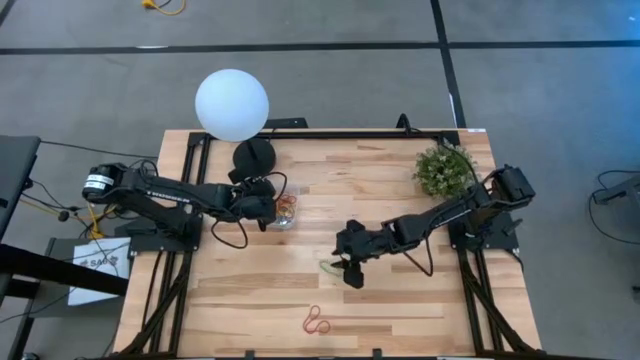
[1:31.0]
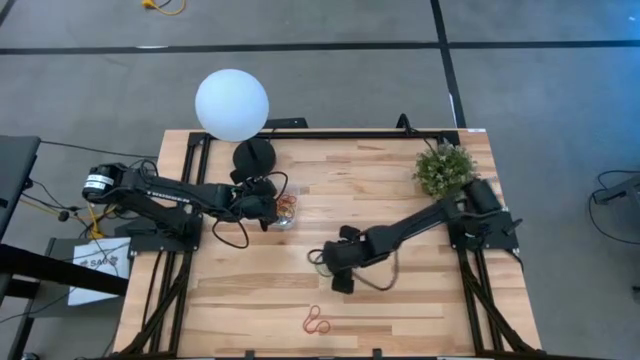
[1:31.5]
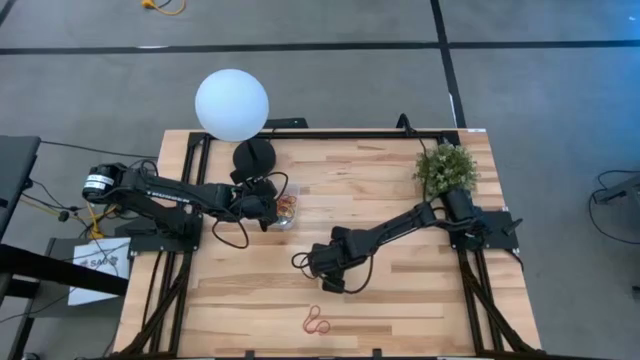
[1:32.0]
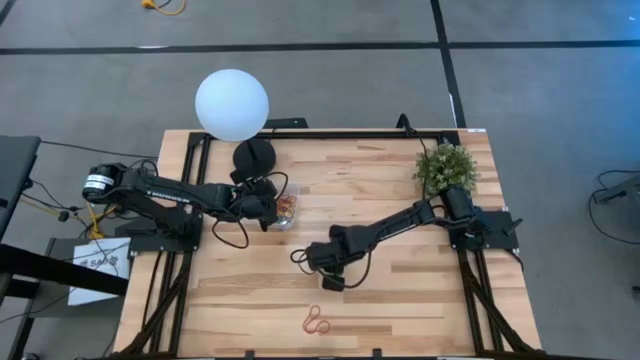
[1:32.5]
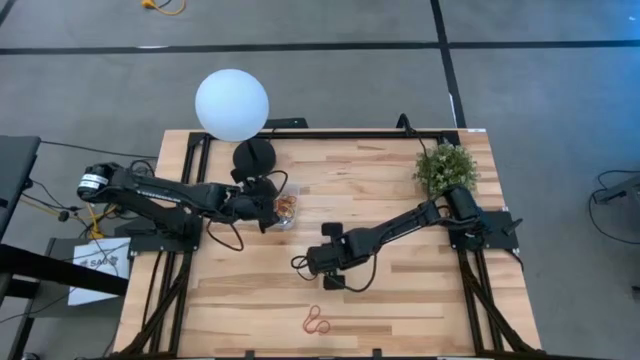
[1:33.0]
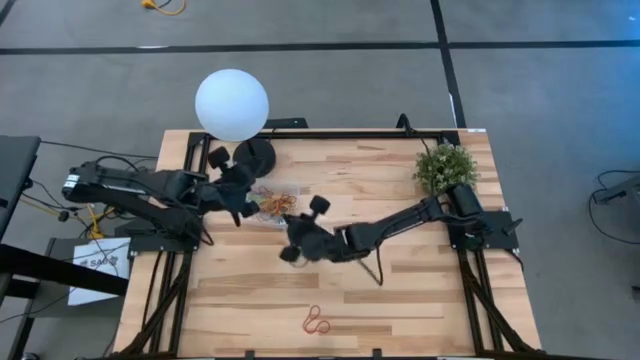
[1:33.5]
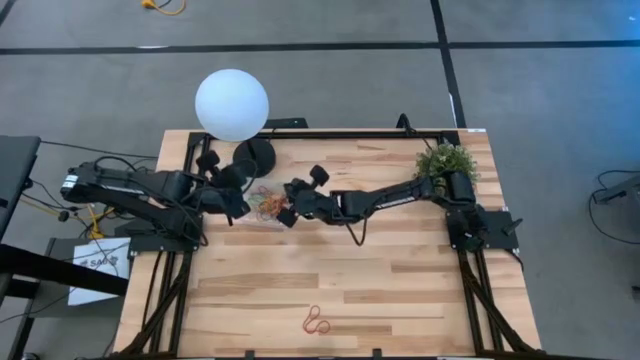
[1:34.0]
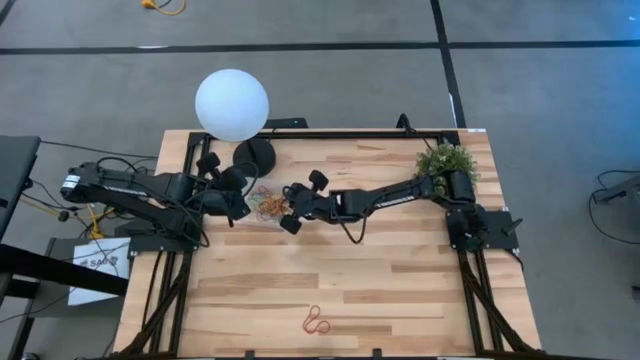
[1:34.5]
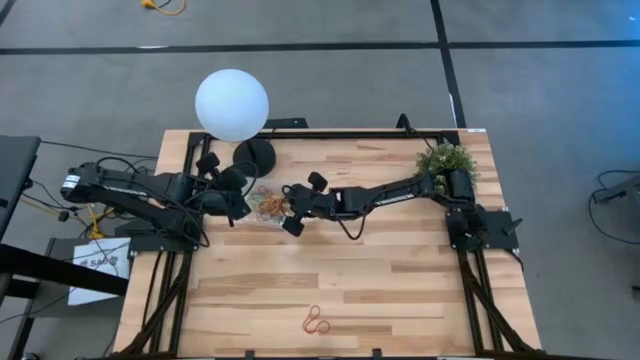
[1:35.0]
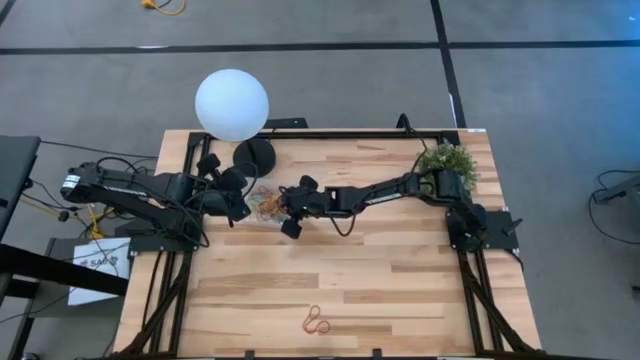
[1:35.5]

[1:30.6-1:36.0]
Task: Pick and place rubber bands into bin
Put the green rubber band into the transparent container

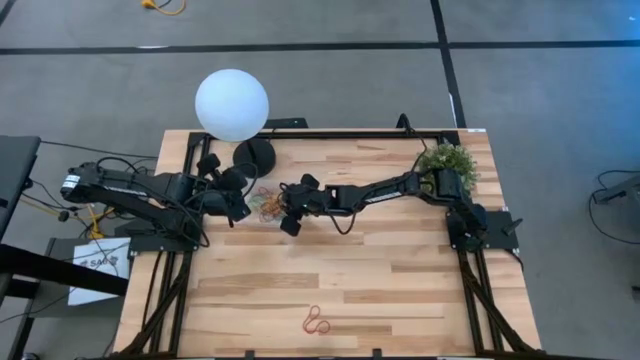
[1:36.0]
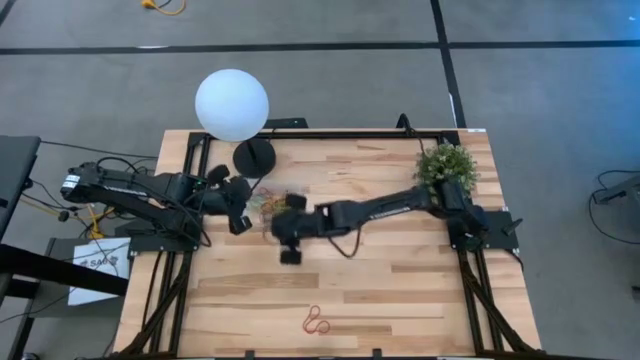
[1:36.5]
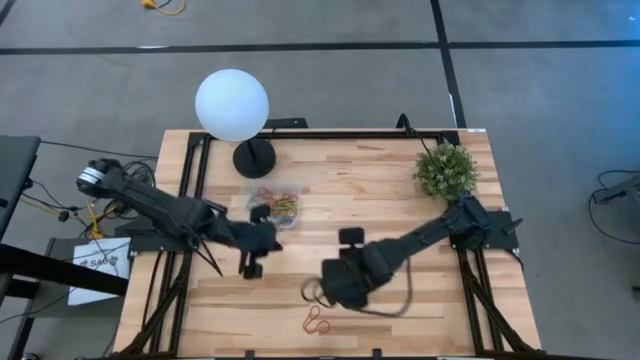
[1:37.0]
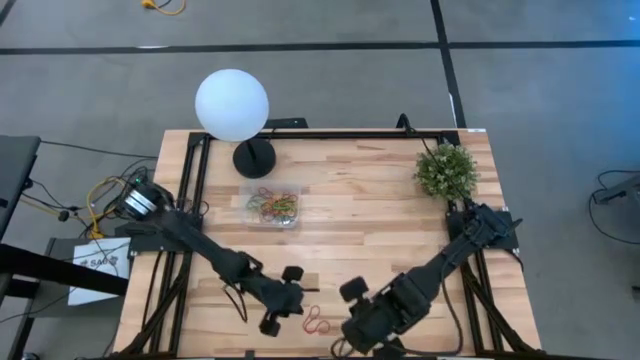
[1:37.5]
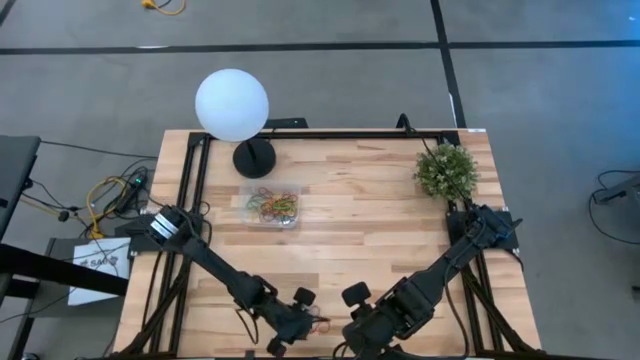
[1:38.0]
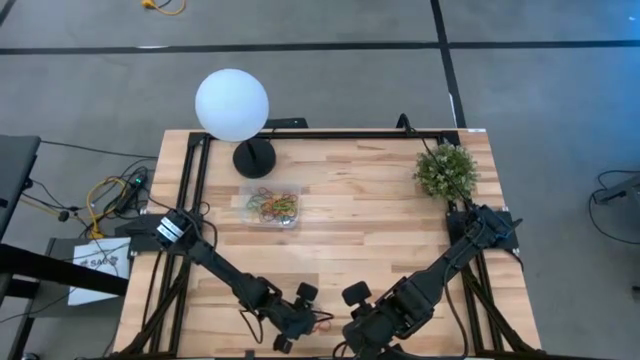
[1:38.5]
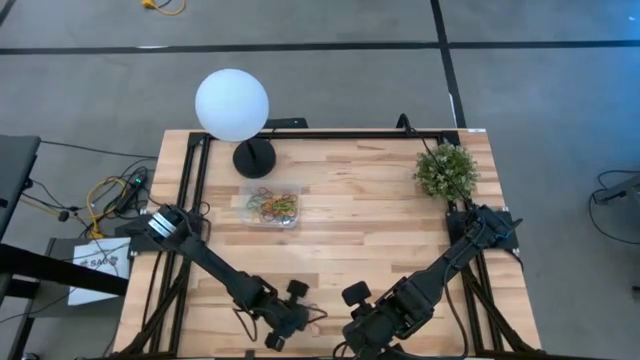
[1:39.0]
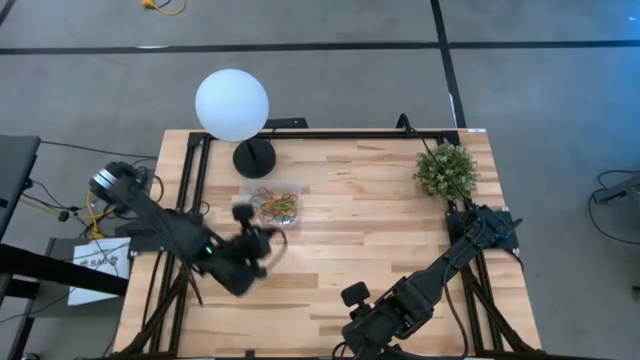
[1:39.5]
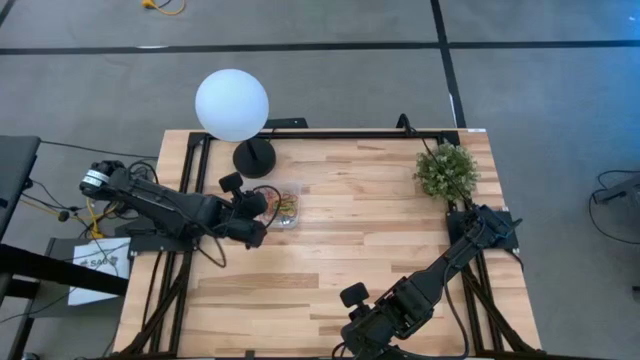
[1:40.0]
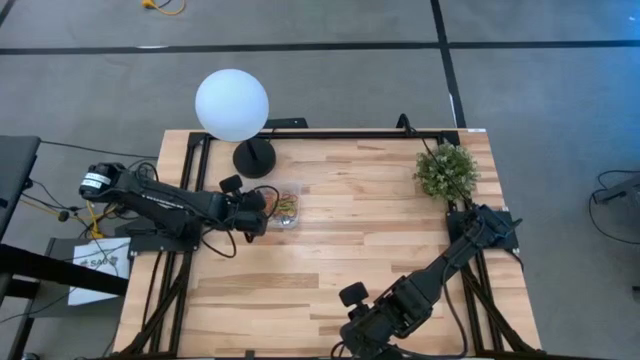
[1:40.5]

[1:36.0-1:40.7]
Put the red rubber band into the transparent container

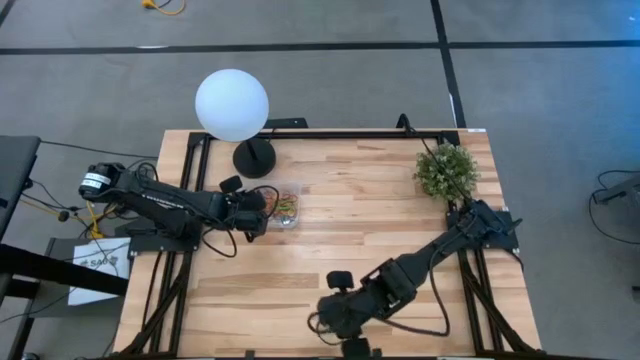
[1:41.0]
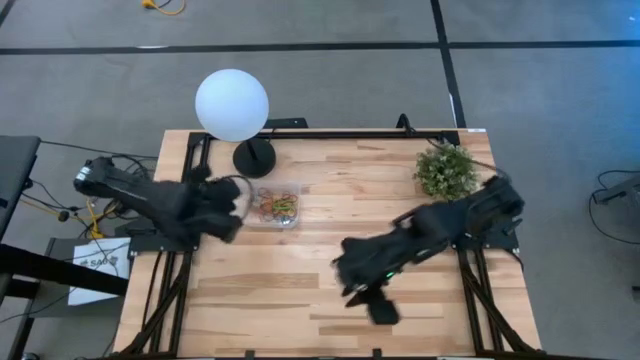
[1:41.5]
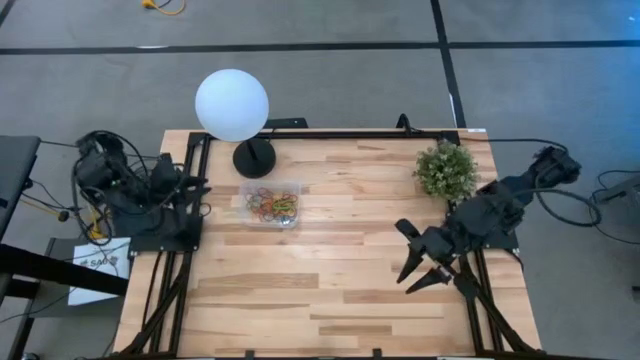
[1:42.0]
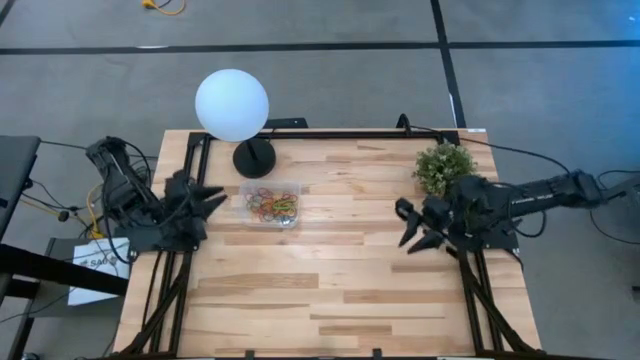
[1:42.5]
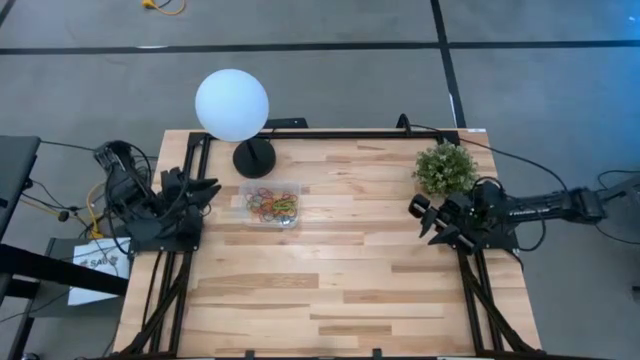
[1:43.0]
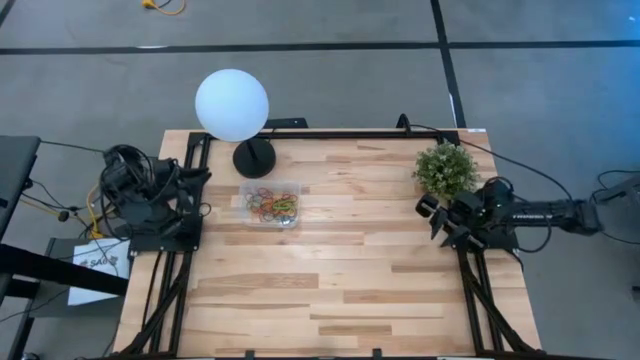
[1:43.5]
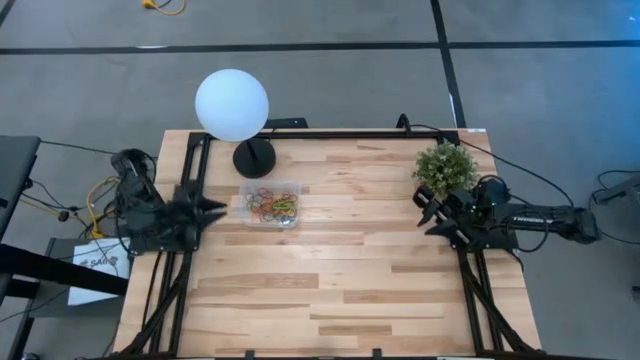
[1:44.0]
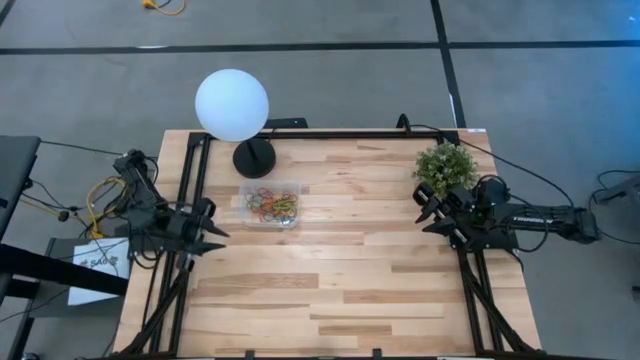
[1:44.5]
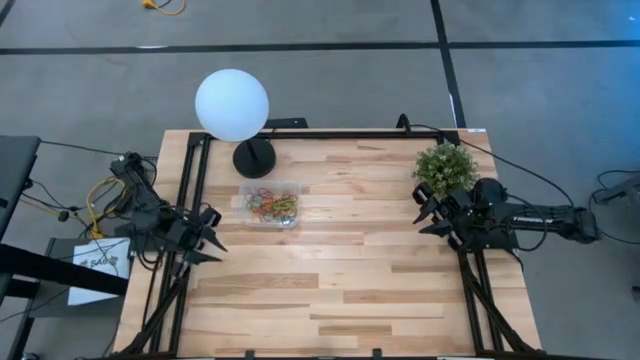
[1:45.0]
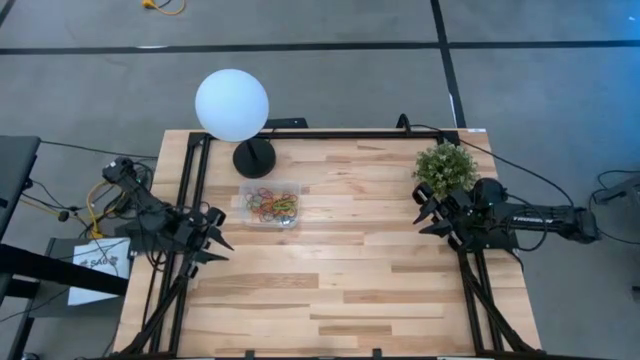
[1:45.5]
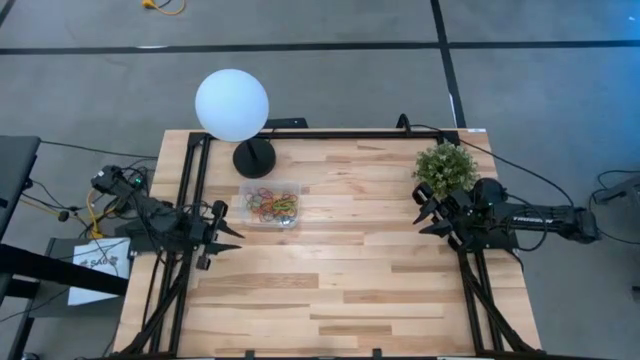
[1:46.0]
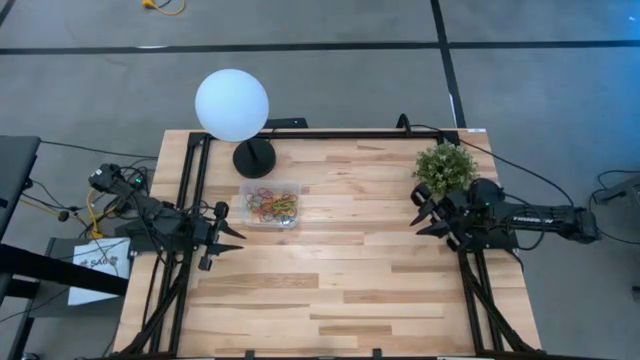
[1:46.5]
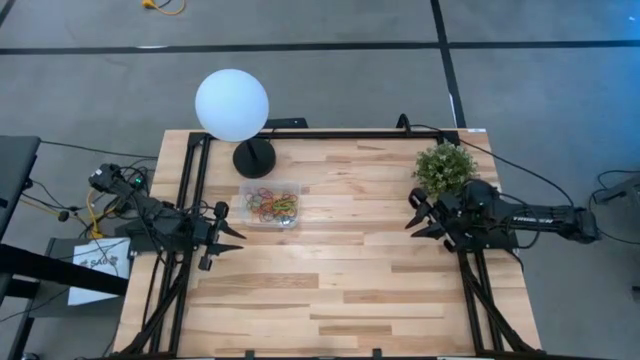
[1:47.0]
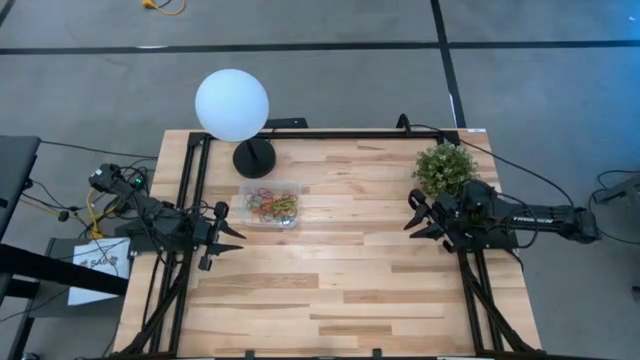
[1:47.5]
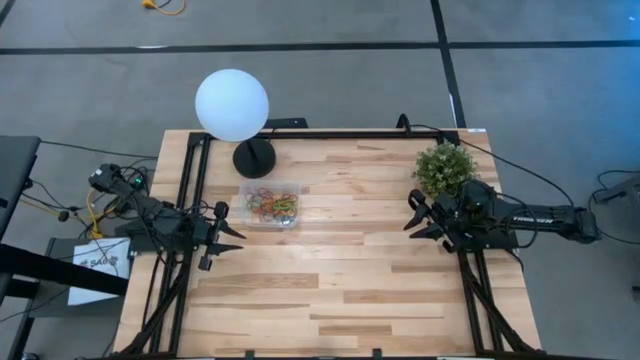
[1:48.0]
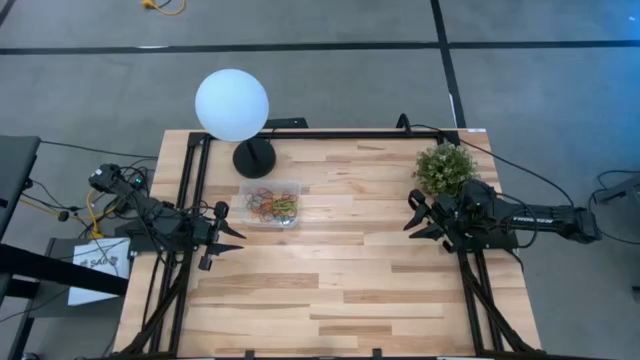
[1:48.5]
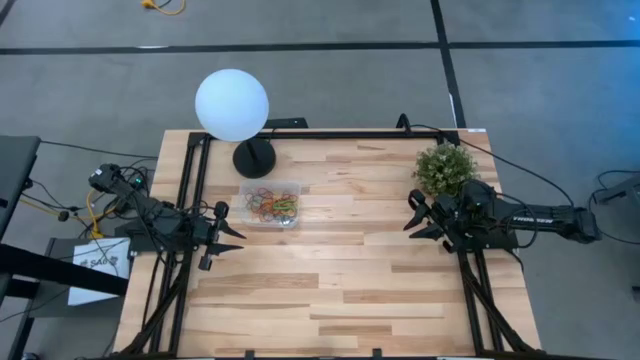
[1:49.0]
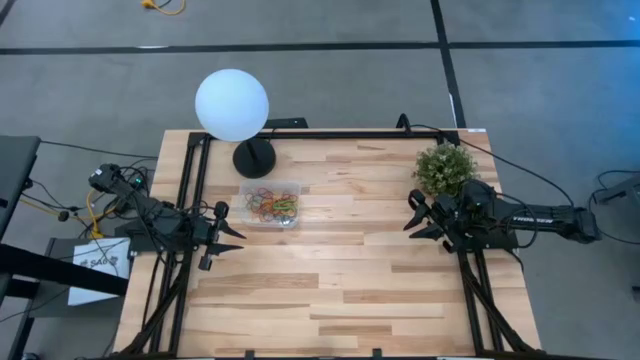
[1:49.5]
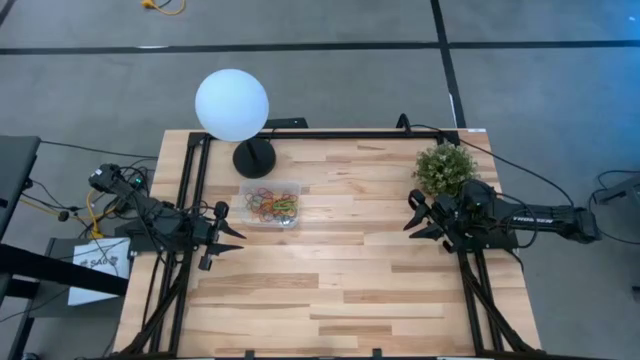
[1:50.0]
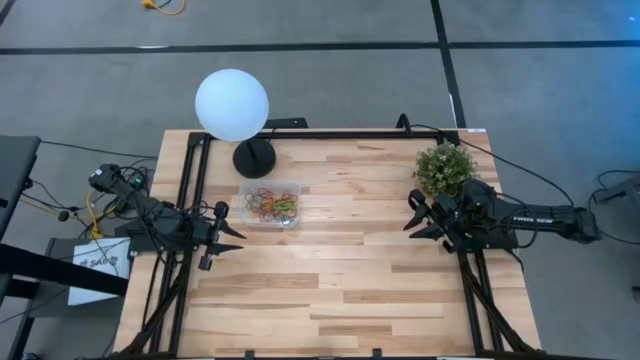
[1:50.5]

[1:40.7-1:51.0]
Return to Home Position

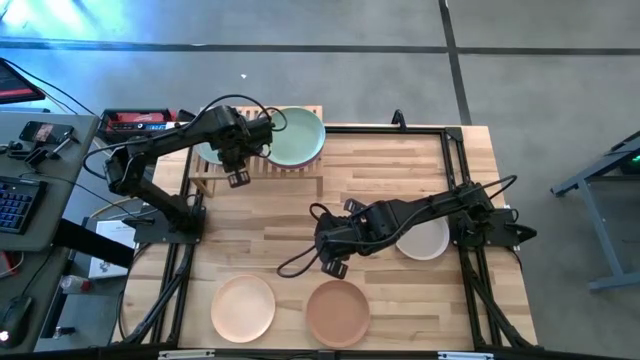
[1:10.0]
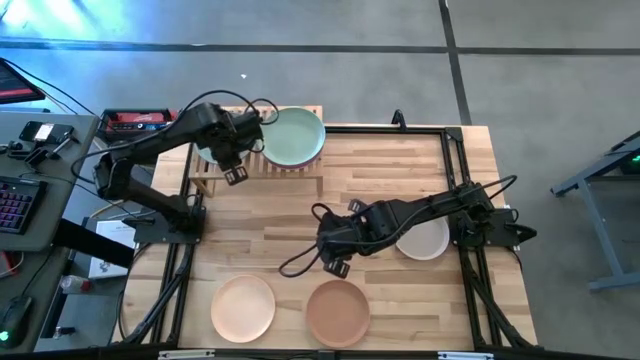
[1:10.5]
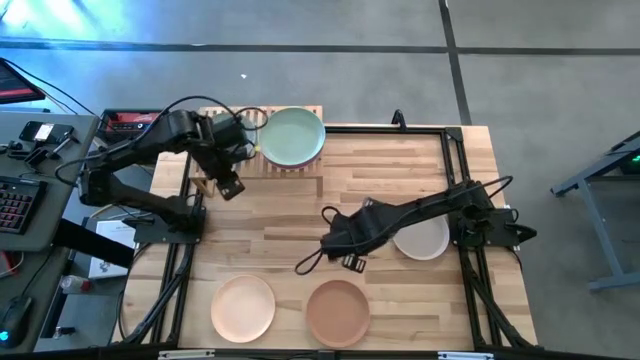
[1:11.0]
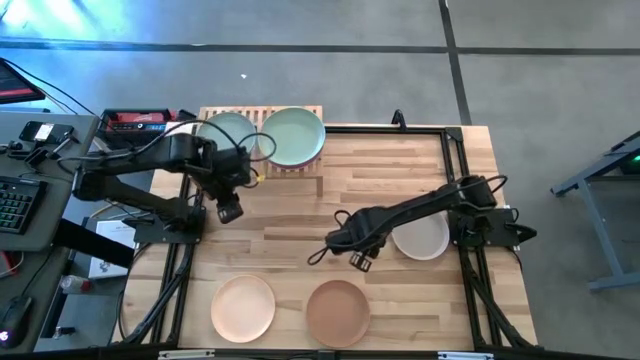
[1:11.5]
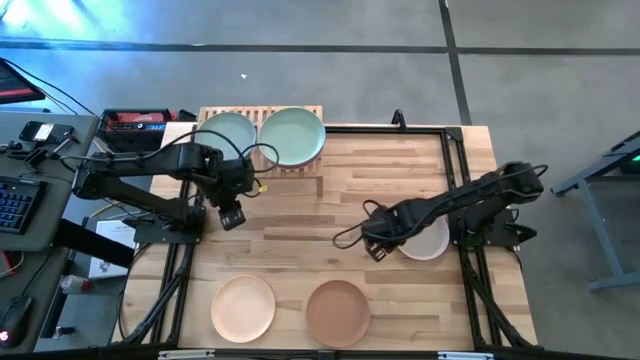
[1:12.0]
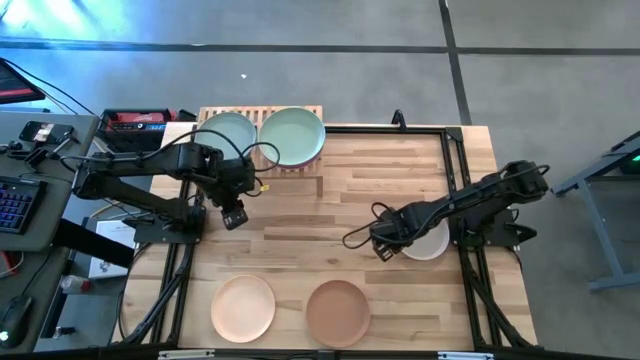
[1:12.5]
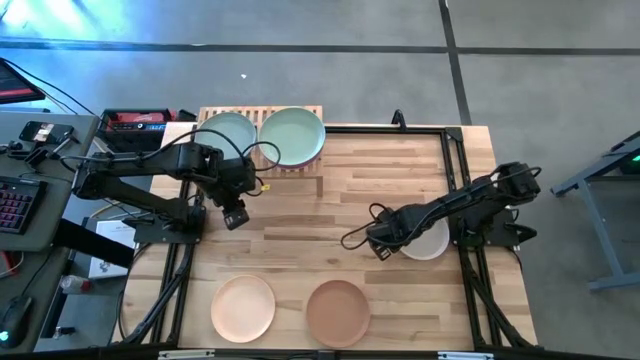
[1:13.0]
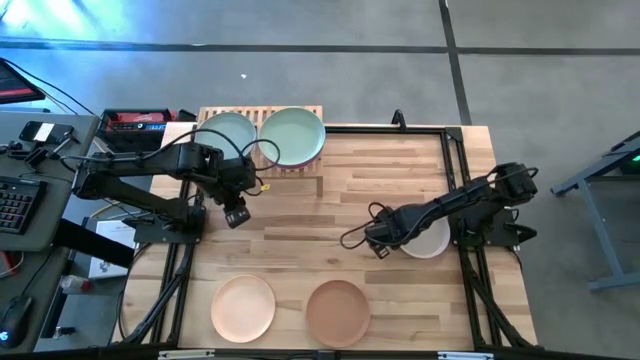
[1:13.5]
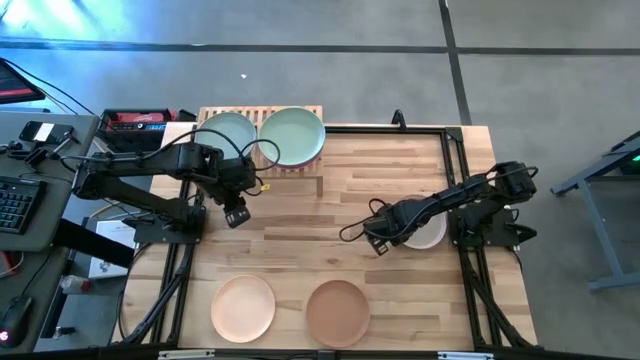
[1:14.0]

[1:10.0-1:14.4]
Task: Place and stack plates onto a shelf
Stack the gray plate on top of the blue plate on the shelf
